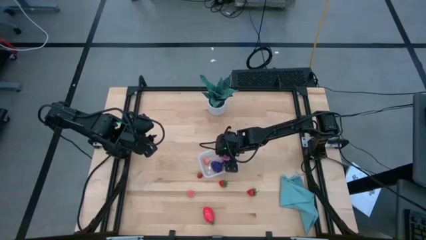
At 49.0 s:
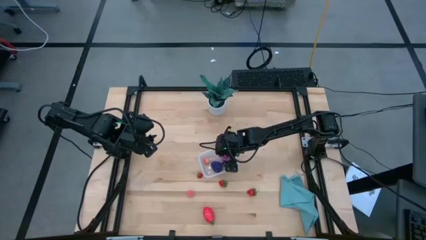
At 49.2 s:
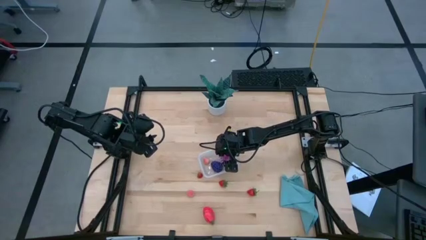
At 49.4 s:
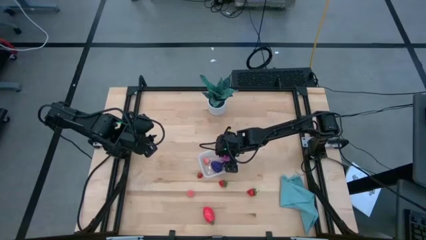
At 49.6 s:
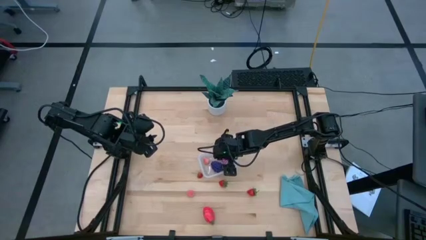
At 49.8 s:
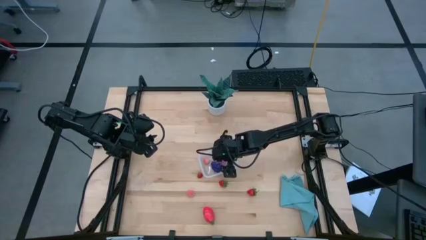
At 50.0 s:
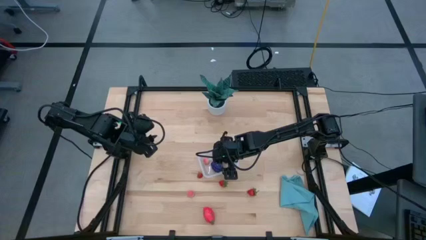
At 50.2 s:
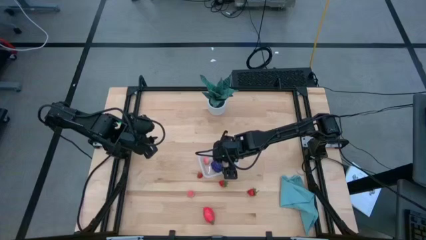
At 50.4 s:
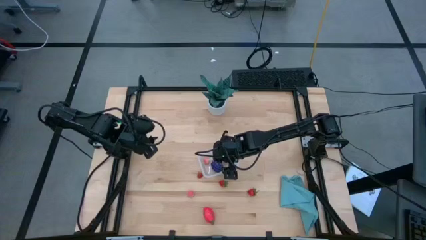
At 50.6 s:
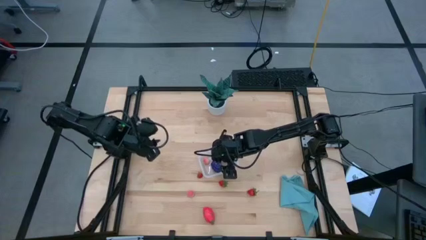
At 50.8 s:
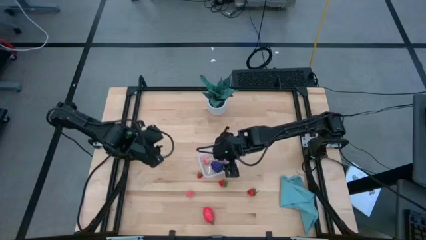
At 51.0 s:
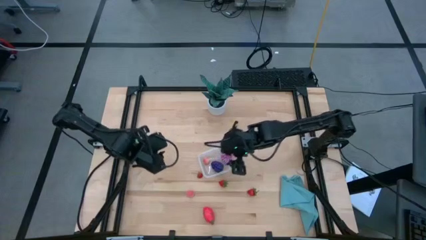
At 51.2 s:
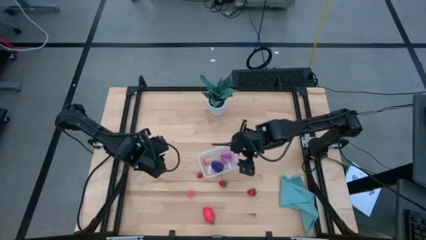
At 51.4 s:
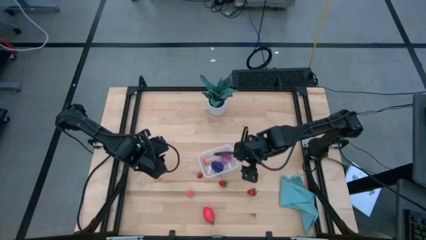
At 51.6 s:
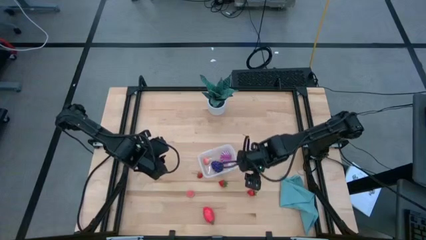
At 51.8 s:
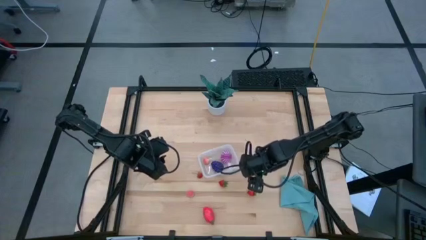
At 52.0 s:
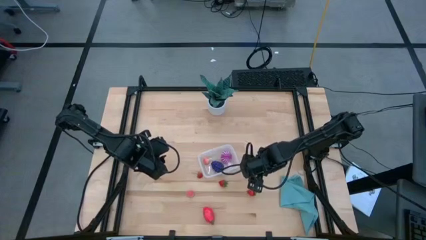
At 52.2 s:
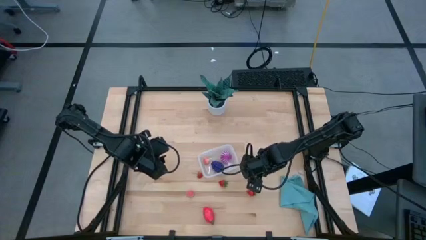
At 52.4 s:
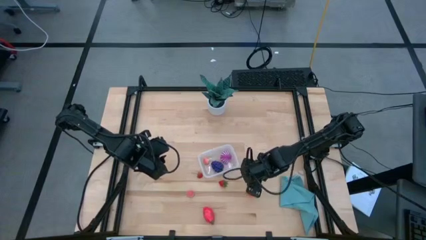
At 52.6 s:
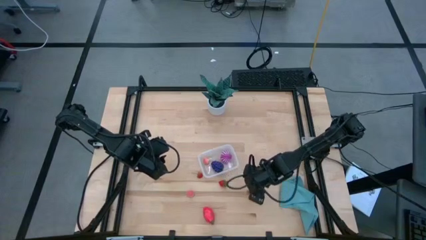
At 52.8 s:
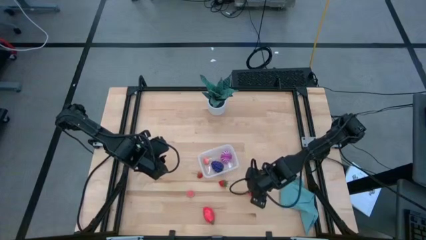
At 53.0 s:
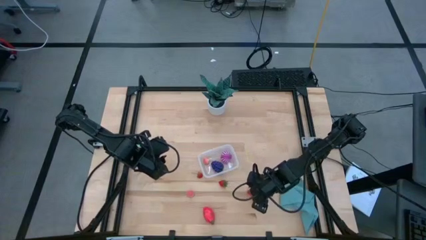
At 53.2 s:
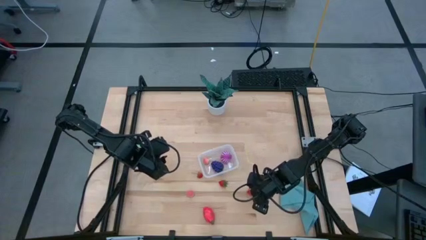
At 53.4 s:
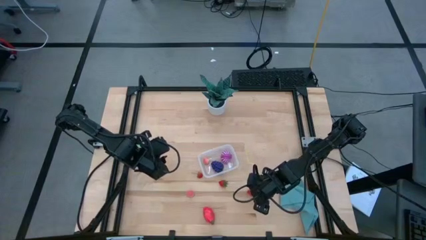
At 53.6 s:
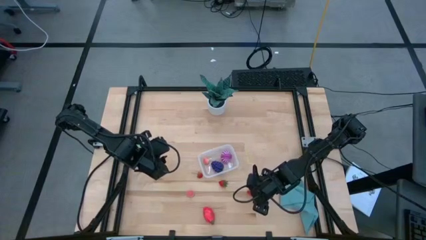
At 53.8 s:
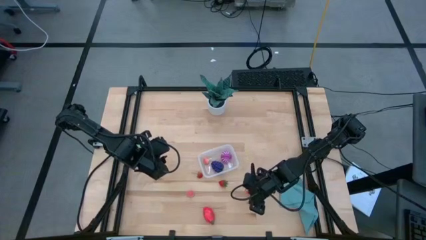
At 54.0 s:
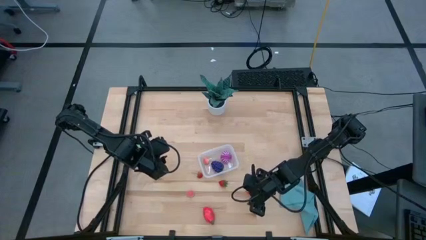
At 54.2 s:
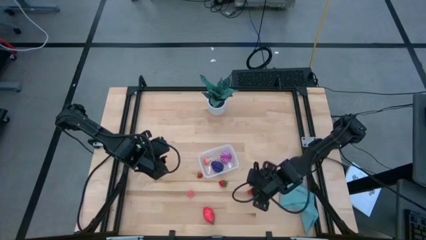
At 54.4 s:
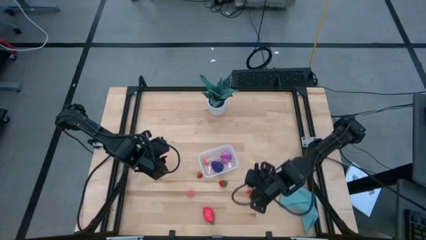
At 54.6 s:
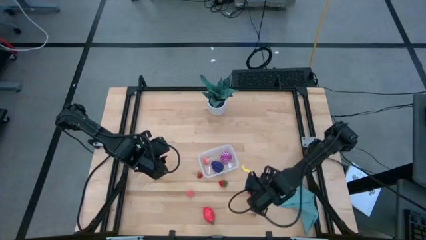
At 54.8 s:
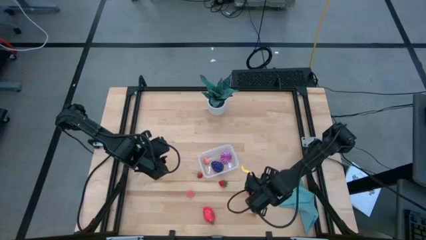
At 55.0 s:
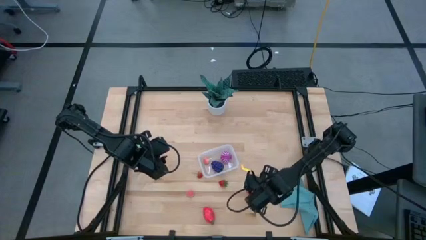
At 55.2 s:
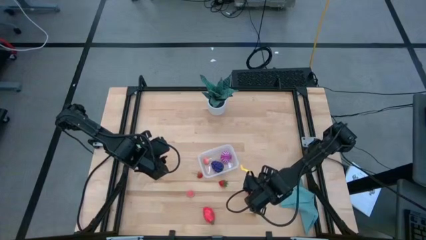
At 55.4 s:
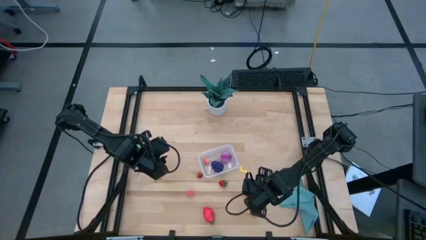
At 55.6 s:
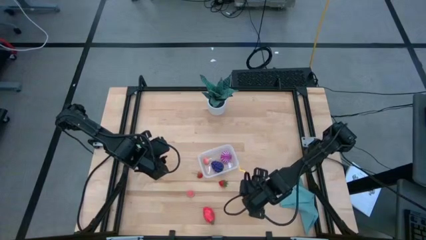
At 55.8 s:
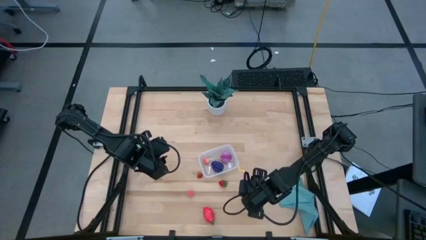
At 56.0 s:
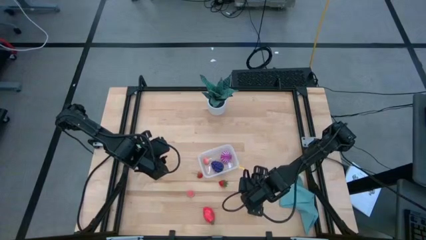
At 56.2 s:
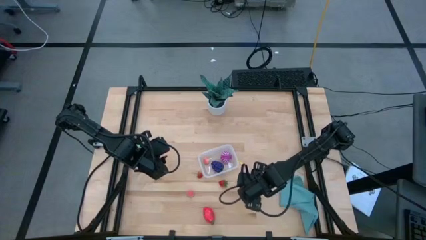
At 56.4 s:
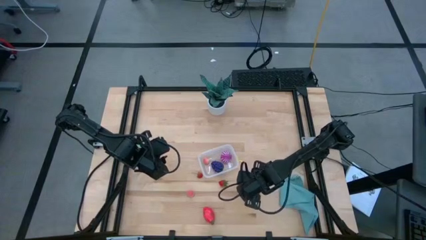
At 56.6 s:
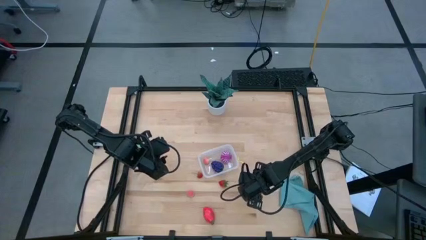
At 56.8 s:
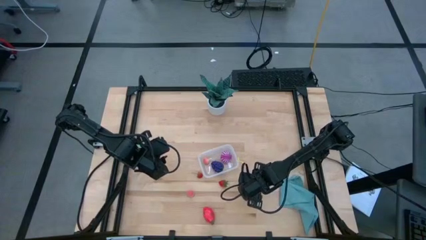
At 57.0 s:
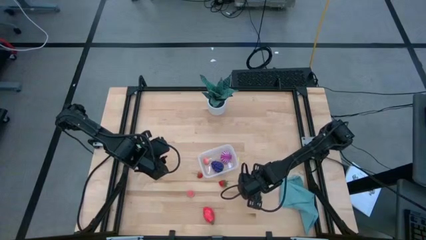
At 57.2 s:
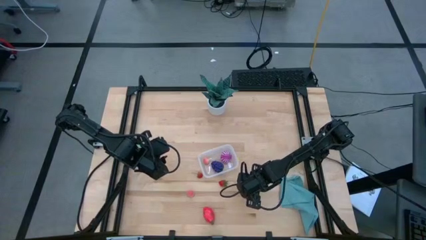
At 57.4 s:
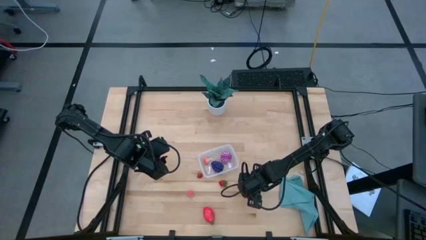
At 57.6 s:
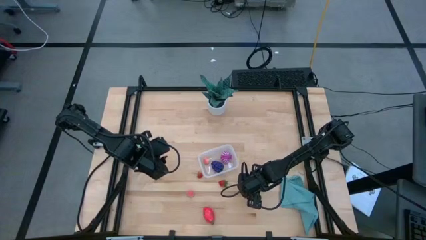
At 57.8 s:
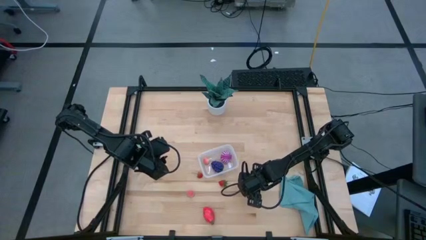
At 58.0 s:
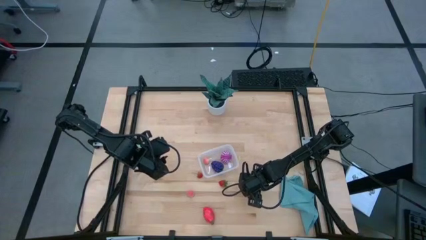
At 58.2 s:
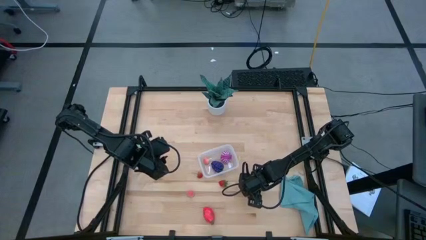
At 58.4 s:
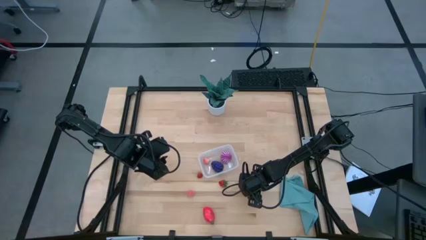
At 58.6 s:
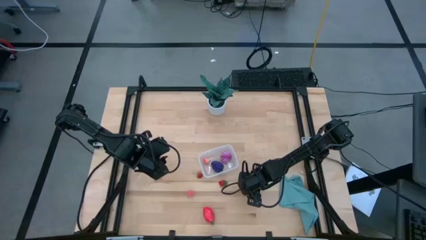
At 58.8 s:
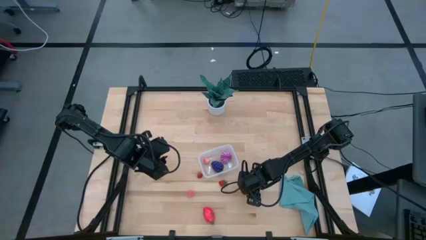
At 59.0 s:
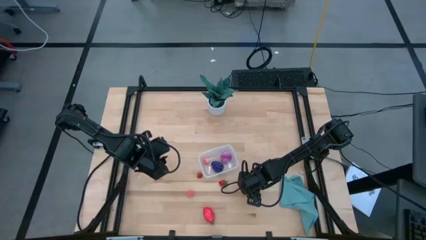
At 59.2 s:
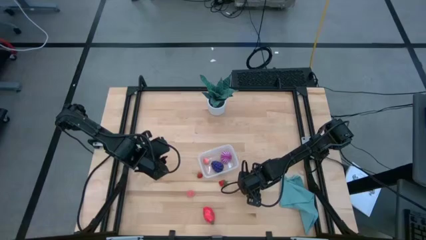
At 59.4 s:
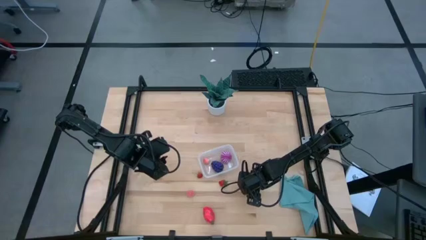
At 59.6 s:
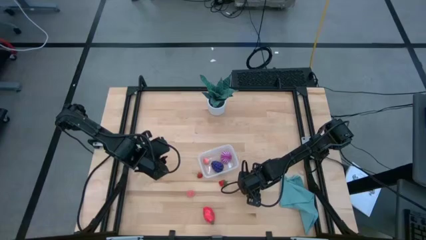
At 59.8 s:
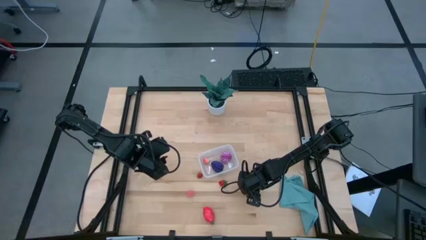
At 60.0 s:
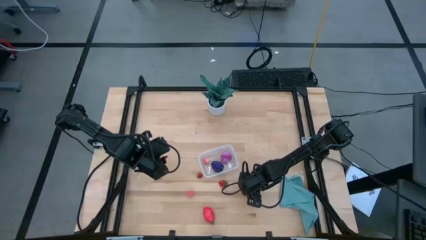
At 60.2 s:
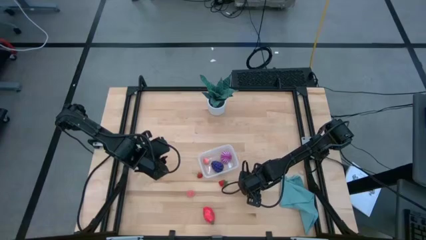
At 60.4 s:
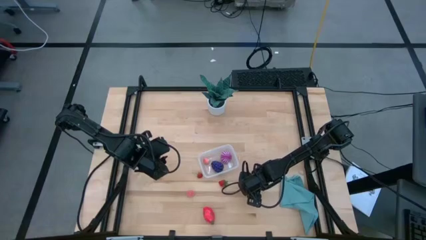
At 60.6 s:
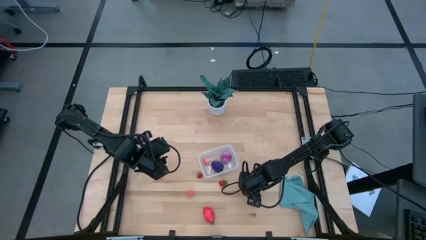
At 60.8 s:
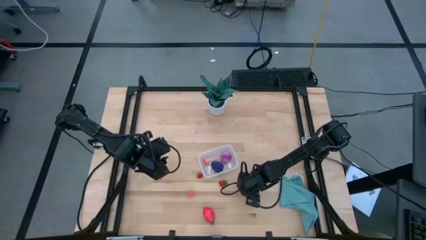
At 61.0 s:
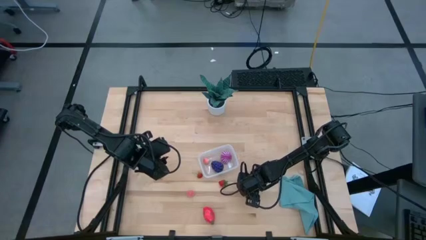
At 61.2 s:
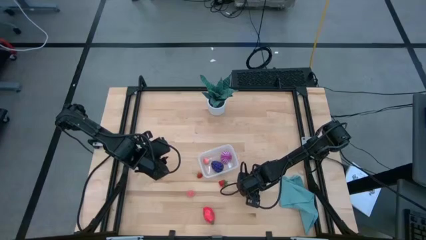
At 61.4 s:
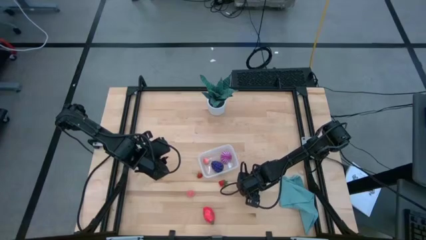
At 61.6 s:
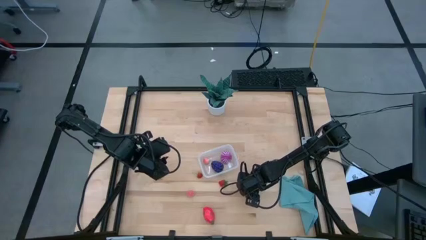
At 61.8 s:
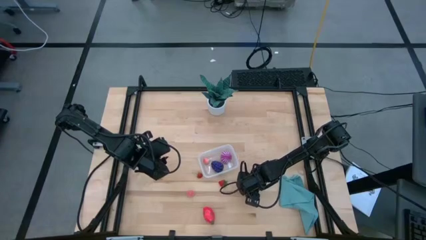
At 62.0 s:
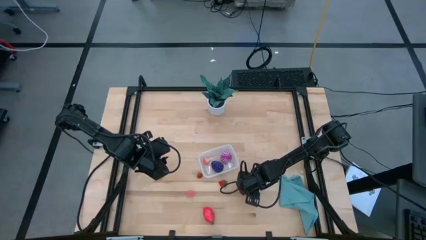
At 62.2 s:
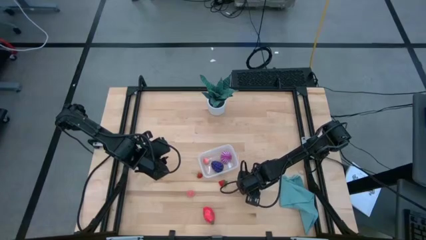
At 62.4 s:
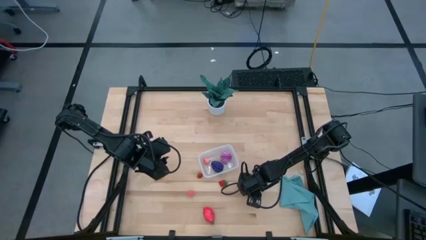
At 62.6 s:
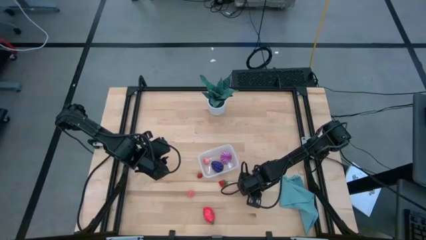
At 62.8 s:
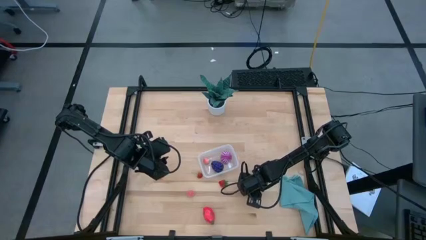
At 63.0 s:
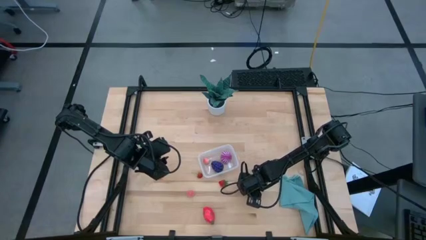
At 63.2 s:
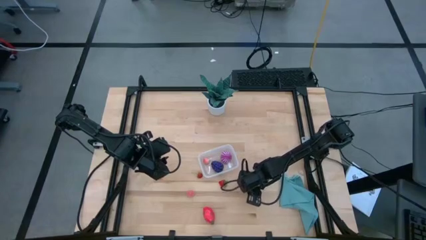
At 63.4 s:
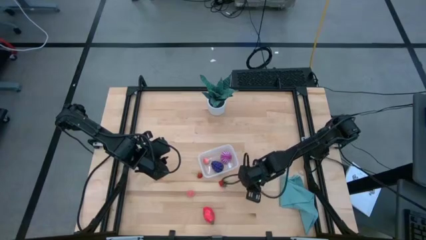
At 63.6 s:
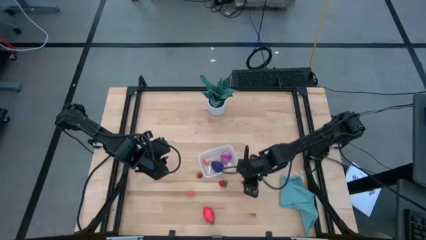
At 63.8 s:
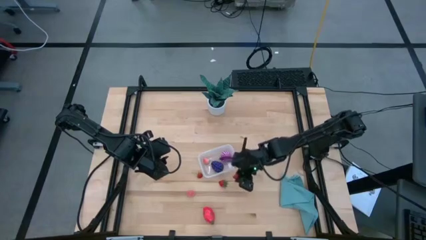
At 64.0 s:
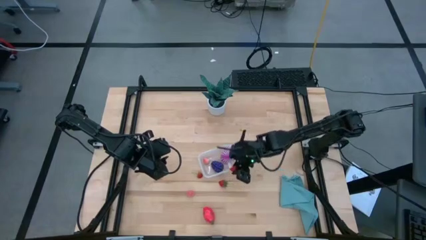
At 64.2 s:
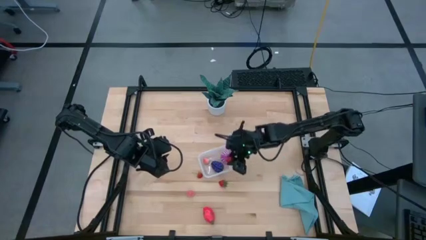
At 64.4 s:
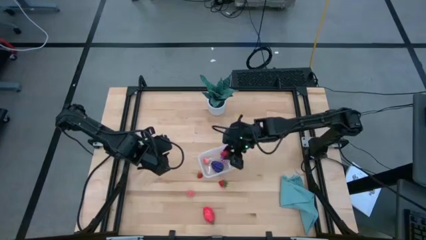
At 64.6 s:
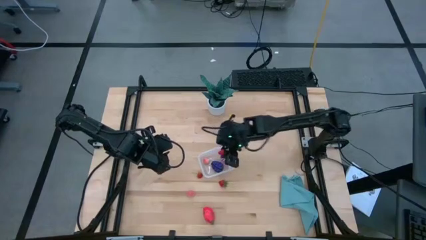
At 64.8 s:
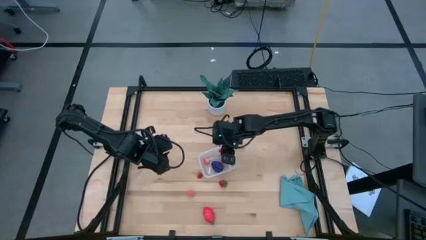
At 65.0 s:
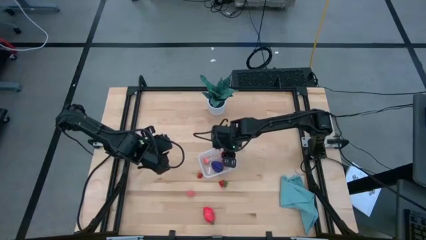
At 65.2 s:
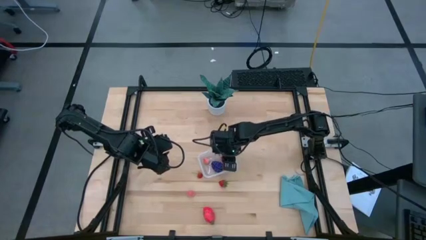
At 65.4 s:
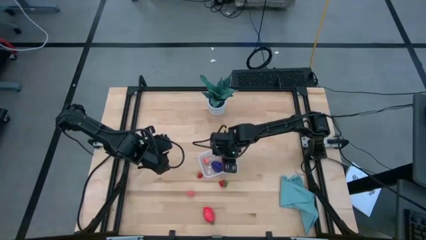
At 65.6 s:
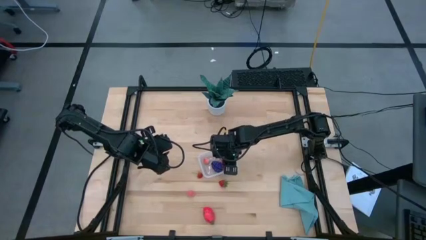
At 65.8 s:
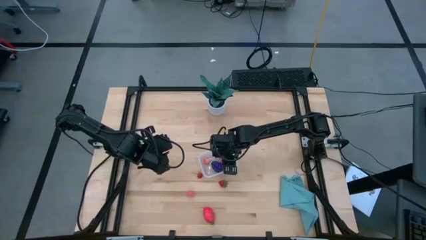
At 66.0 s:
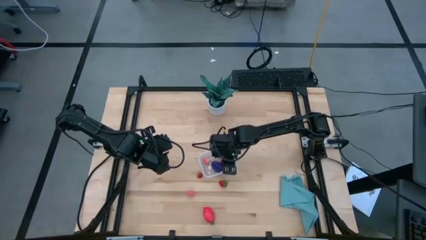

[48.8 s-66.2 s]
Task: Pick and placing Produce into tupperware
Put the bottom strawberry into the transparent bin
